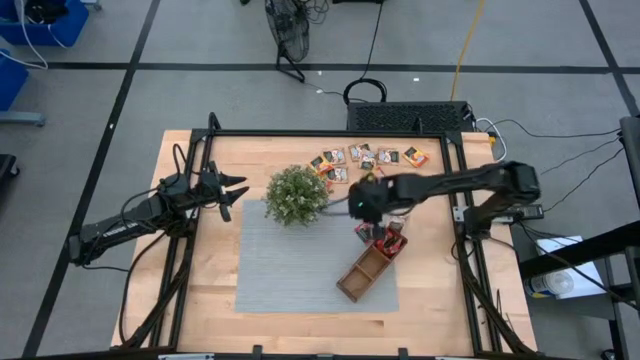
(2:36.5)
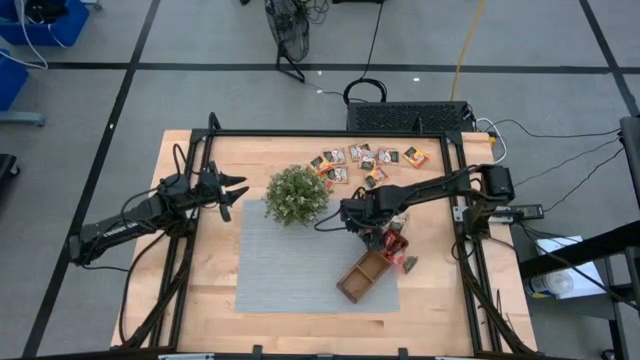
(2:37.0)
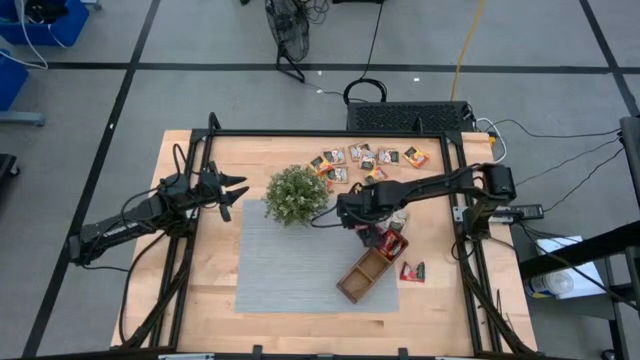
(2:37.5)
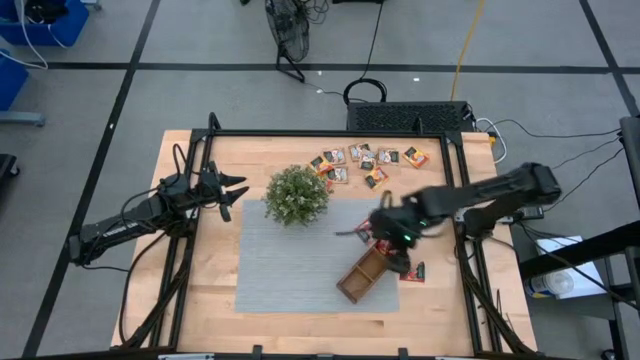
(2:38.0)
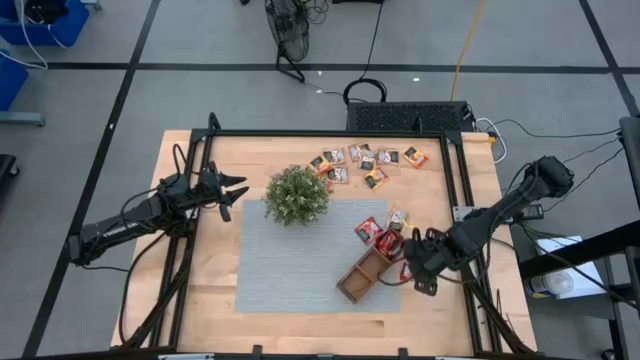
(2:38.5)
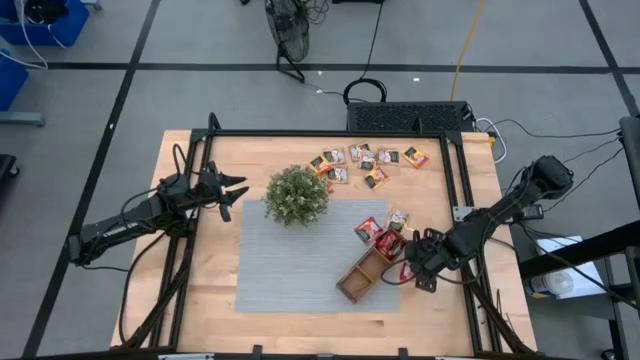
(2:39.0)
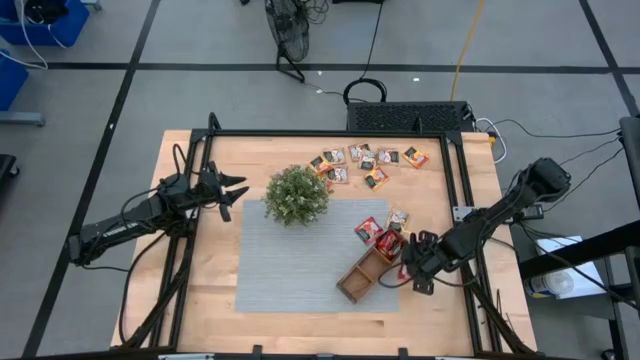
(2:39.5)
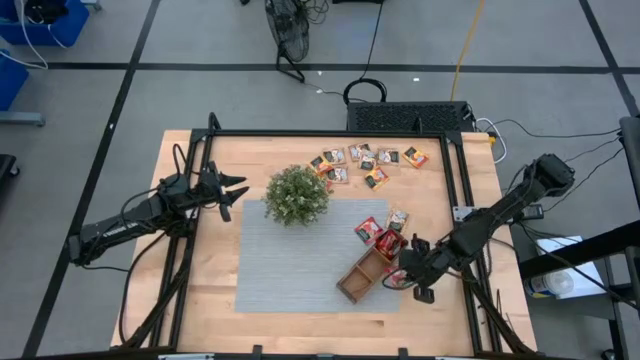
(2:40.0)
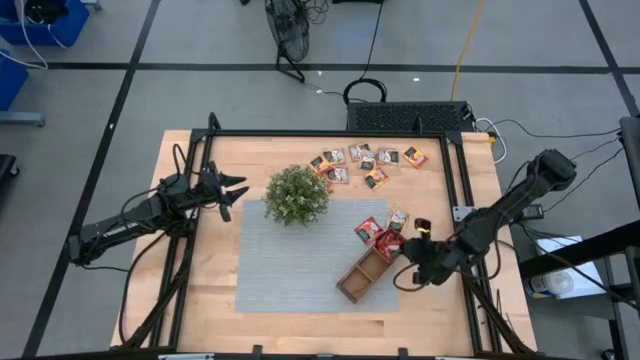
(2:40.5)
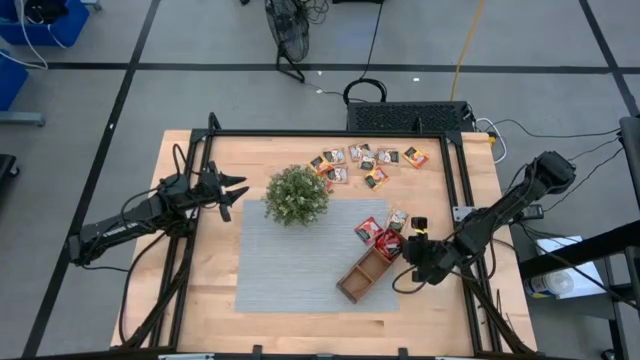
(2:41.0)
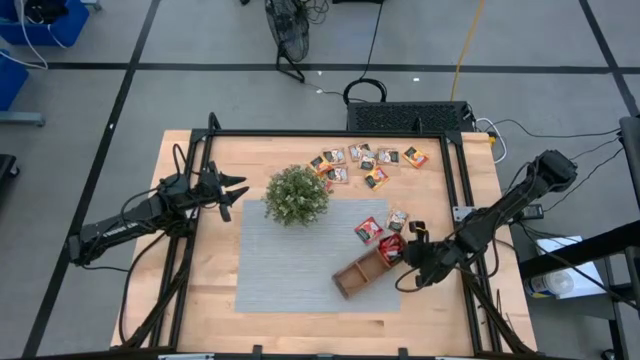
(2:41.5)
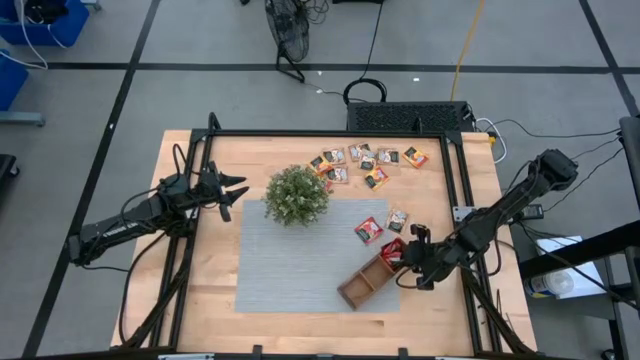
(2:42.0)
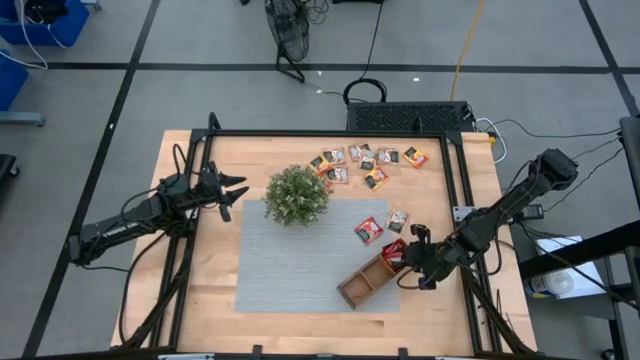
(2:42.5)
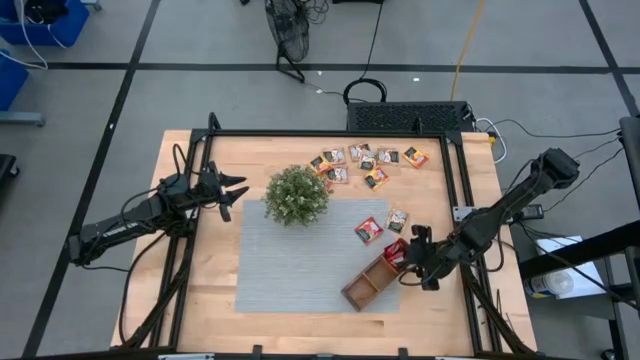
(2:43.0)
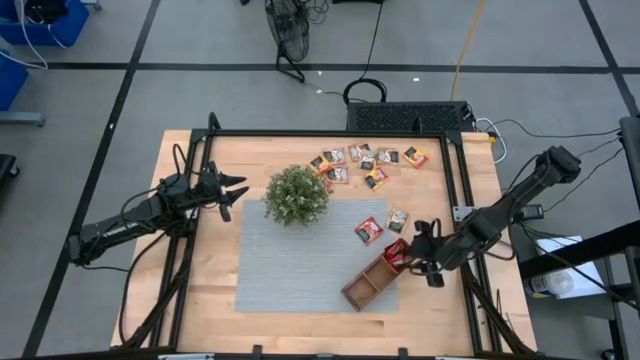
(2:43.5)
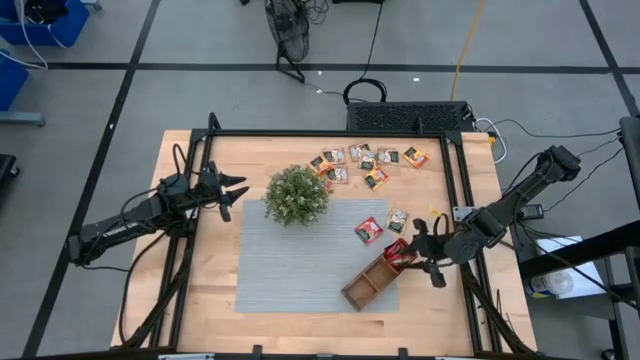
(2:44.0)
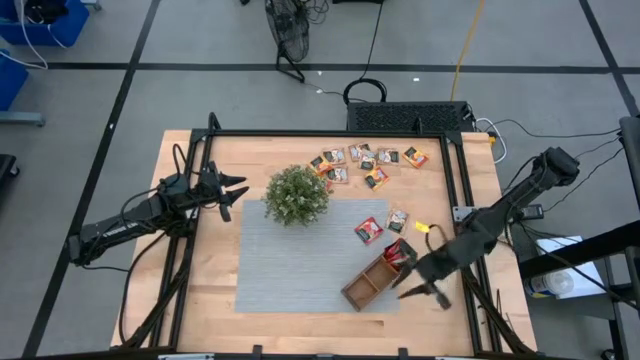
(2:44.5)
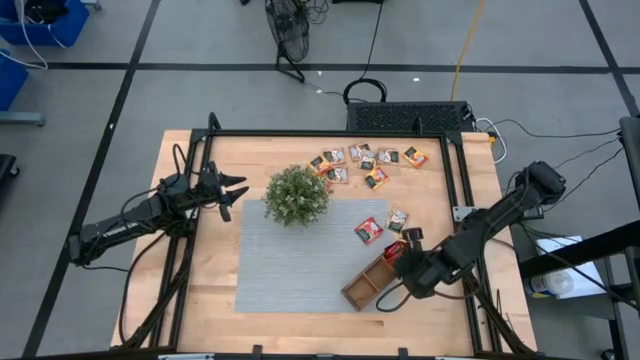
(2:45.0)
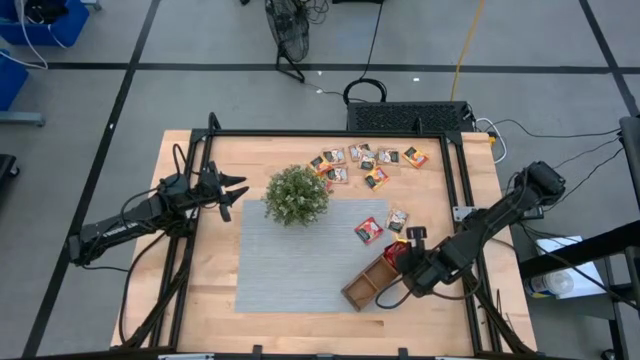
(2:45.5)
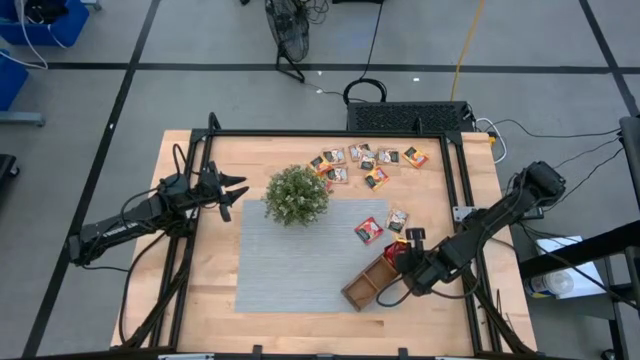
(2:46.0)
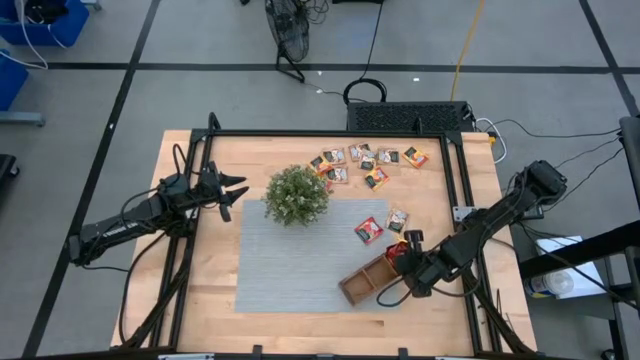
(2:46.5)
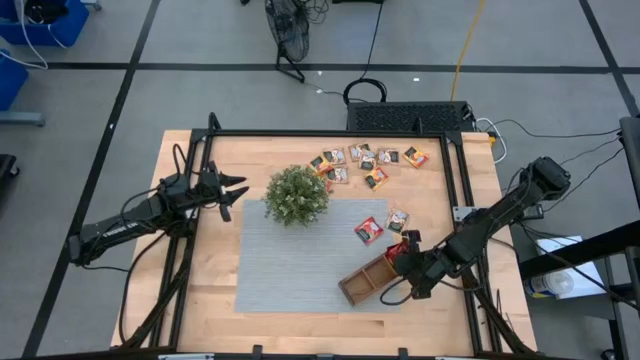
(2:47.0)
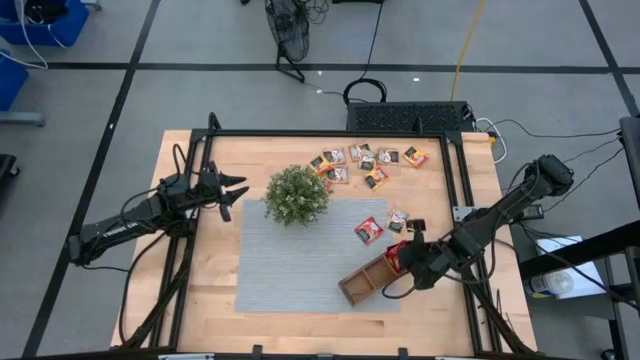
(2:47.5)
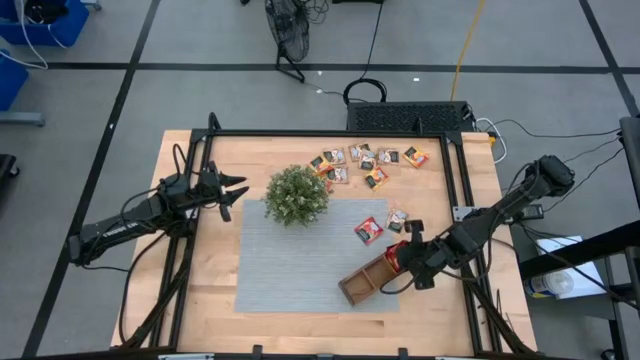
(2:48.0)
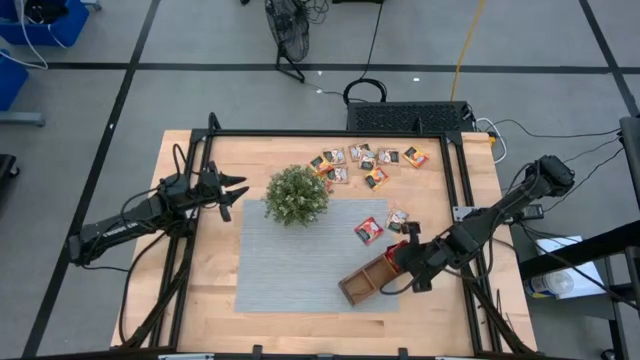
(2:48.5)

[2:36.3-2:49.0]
Task: Pick & Place Tea
Put the strawberry tea sachet into the brown organizer

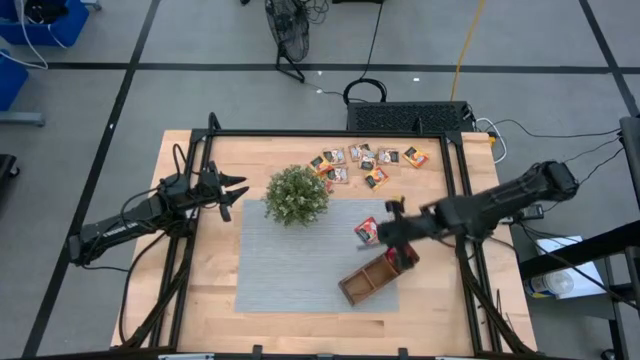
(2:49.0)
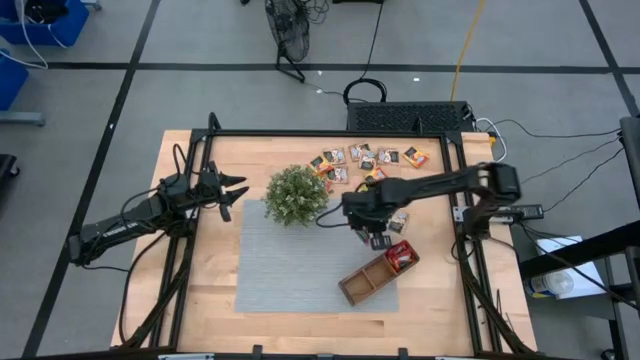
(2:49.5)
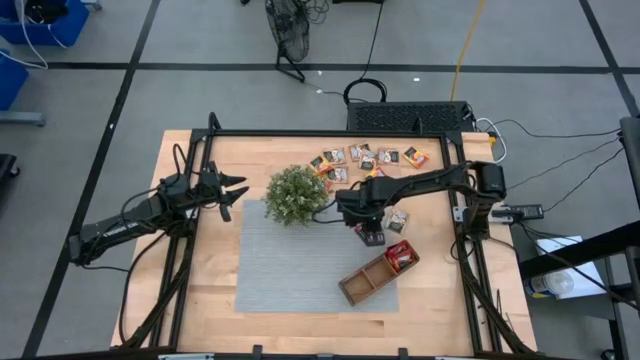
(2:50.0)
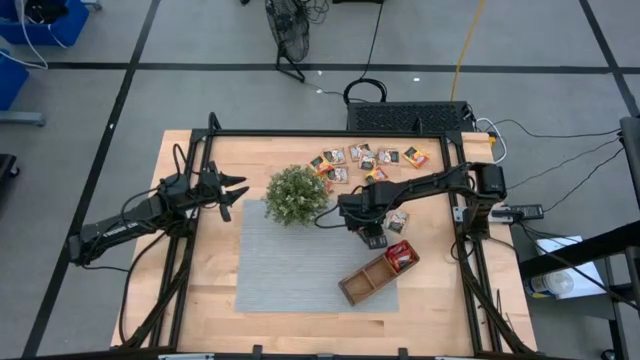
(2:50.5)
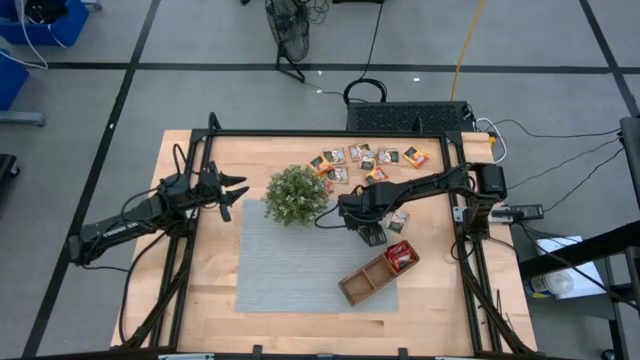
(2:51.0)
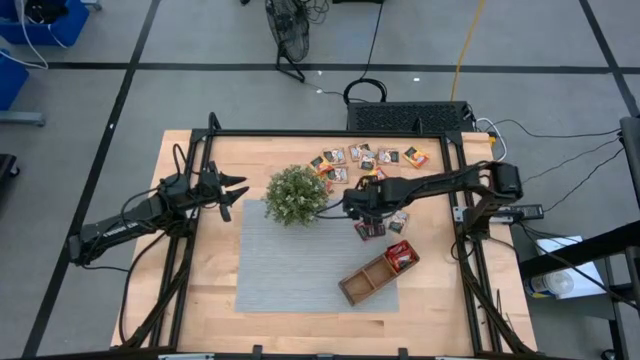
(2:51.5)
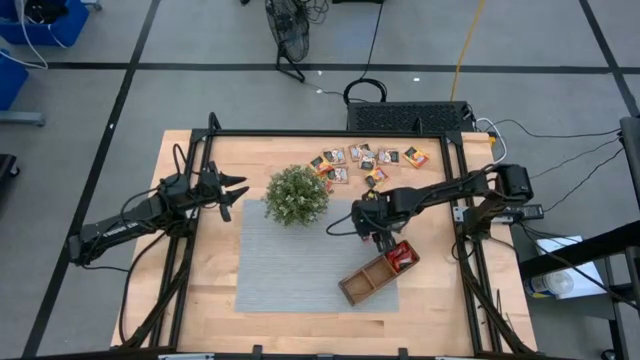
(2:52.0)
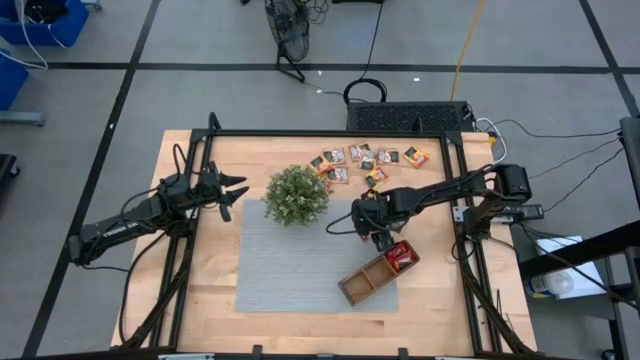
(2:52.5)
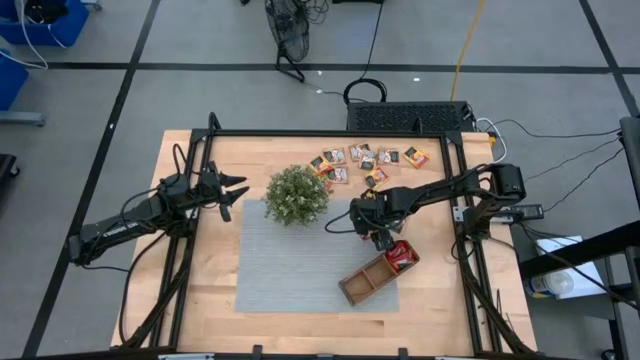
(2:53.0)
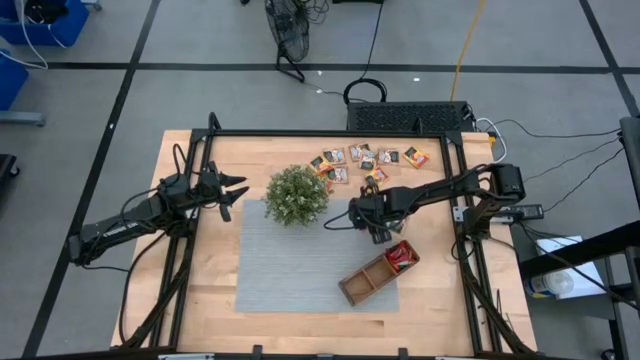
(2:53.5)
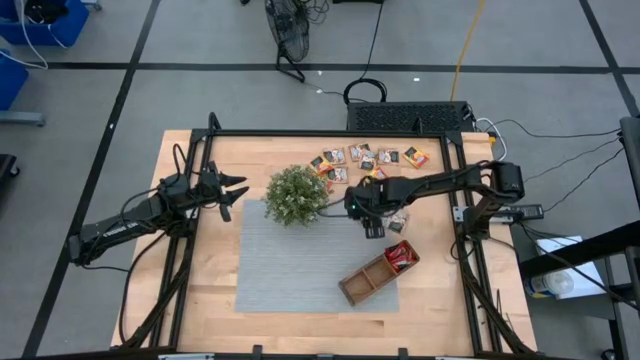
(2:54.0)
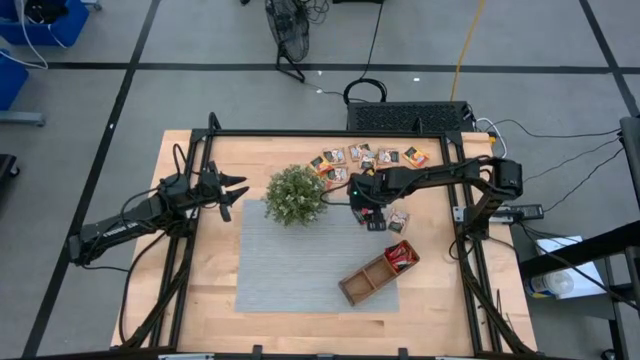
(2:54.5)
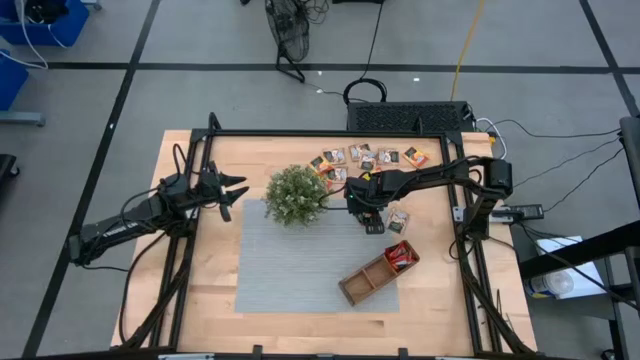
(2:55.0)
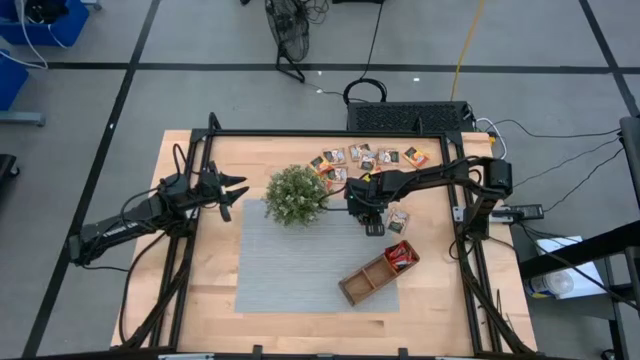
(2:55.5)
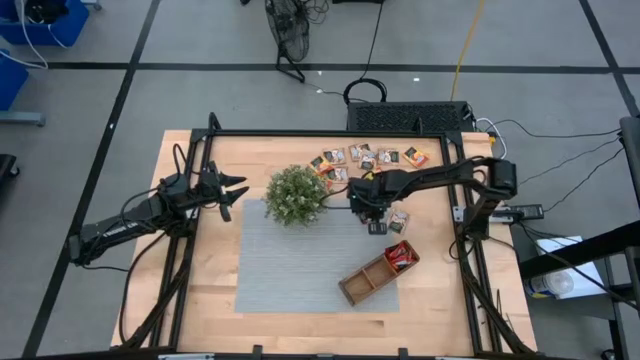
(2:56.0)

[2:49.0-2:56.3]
Put the strawberry tea sachet into the brown organizer
